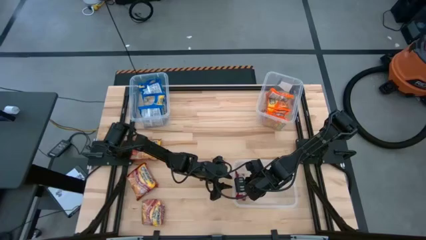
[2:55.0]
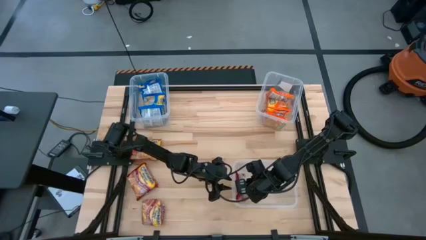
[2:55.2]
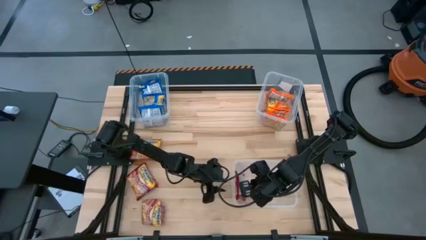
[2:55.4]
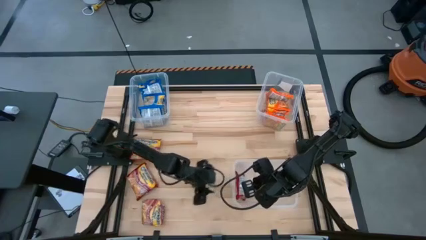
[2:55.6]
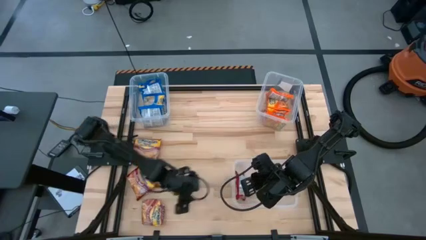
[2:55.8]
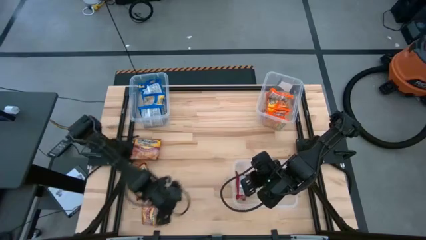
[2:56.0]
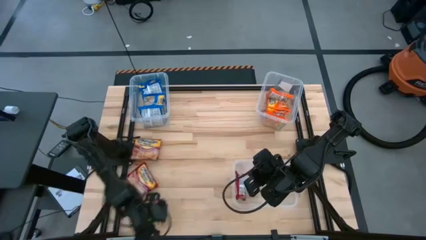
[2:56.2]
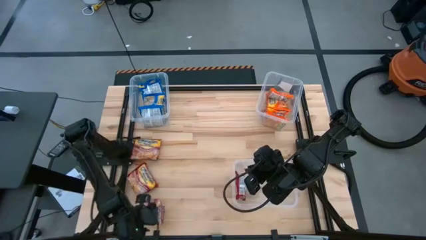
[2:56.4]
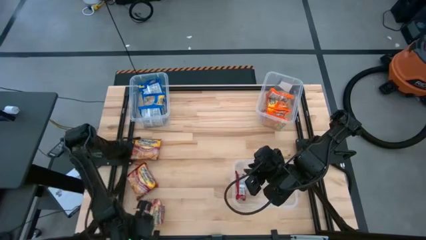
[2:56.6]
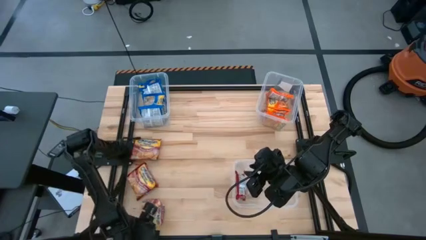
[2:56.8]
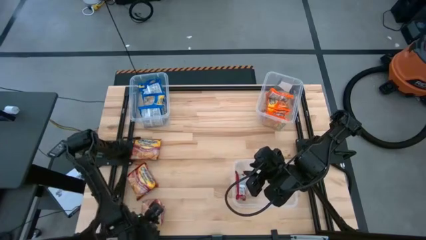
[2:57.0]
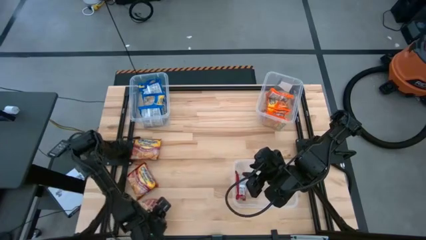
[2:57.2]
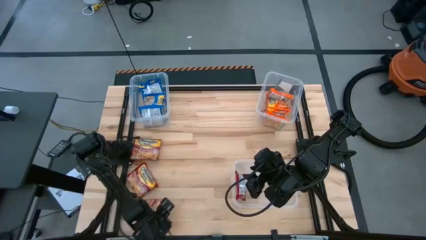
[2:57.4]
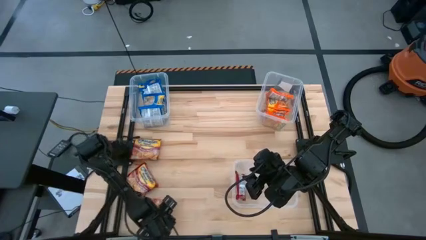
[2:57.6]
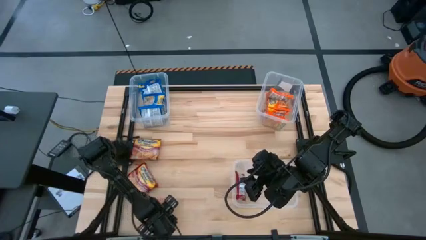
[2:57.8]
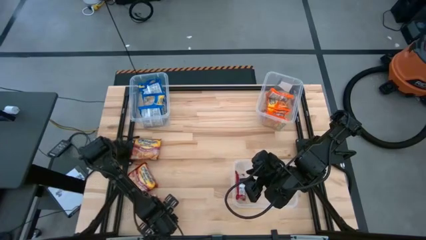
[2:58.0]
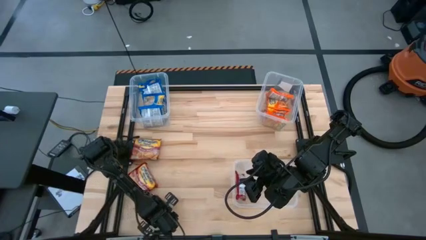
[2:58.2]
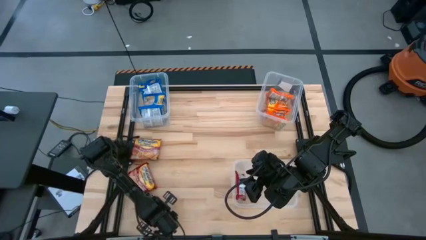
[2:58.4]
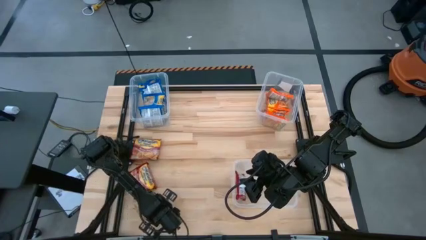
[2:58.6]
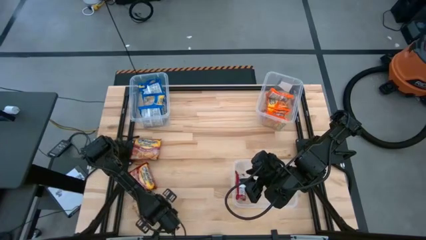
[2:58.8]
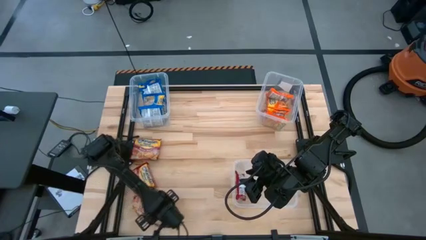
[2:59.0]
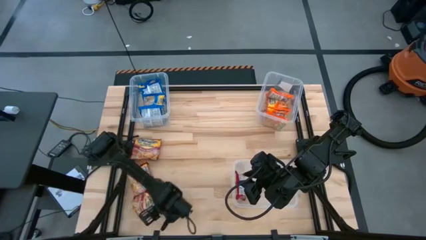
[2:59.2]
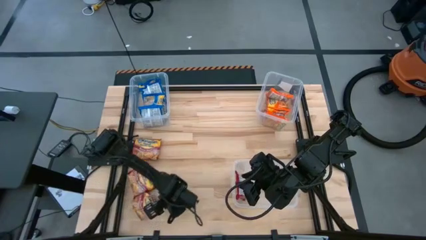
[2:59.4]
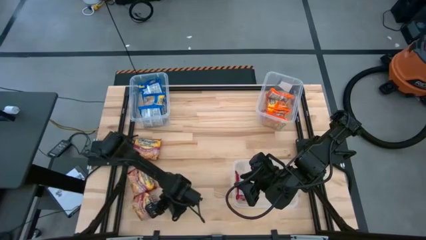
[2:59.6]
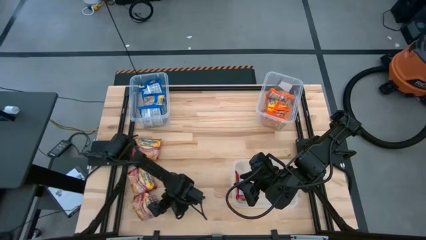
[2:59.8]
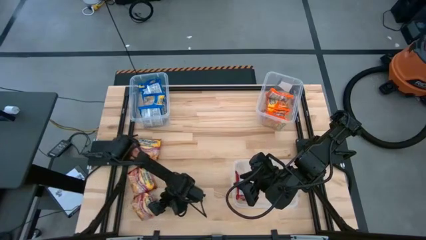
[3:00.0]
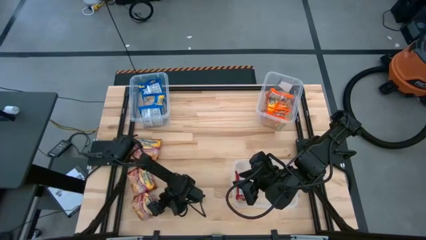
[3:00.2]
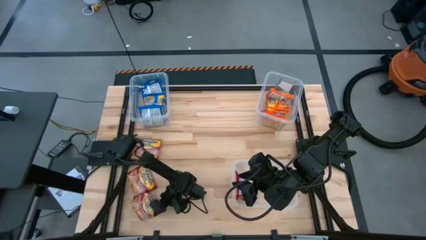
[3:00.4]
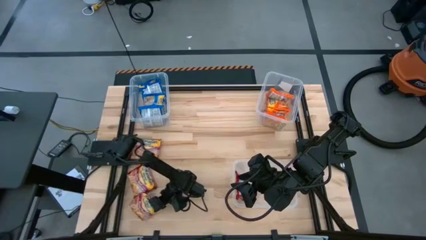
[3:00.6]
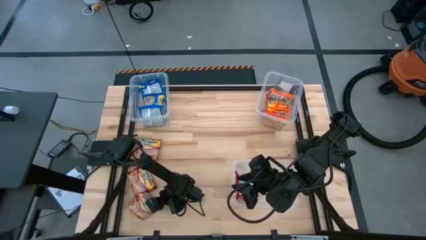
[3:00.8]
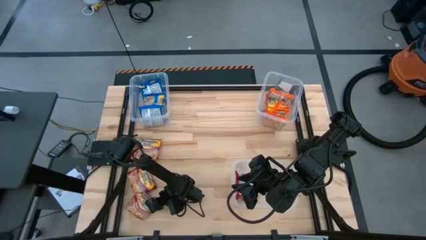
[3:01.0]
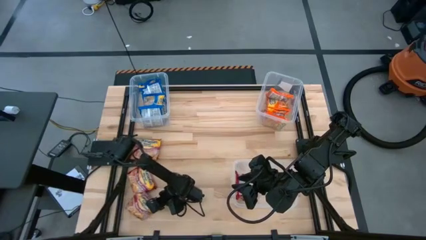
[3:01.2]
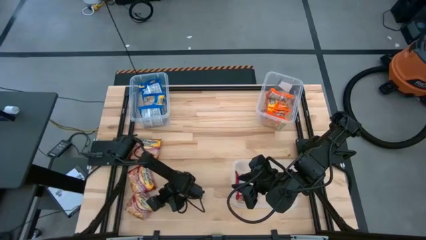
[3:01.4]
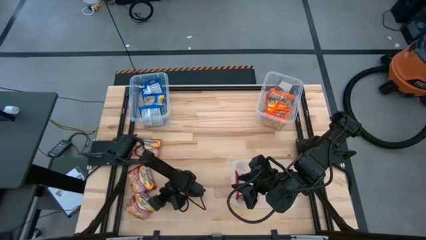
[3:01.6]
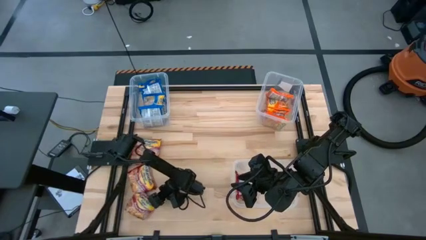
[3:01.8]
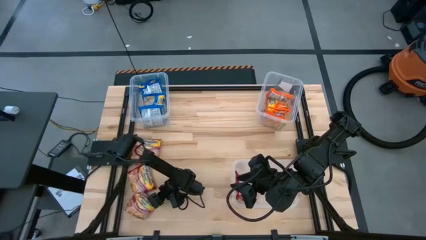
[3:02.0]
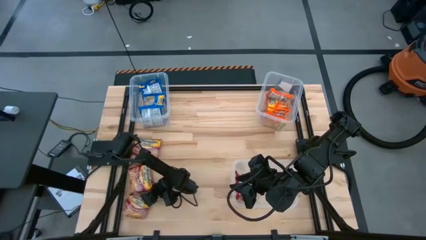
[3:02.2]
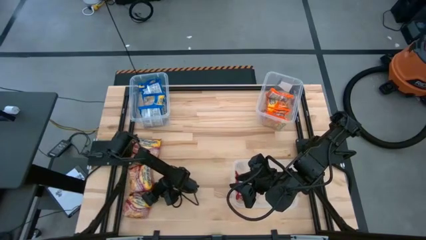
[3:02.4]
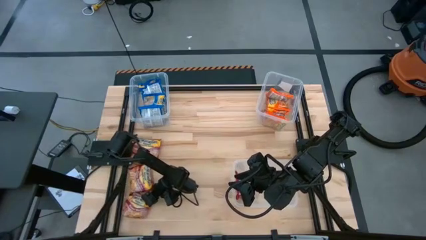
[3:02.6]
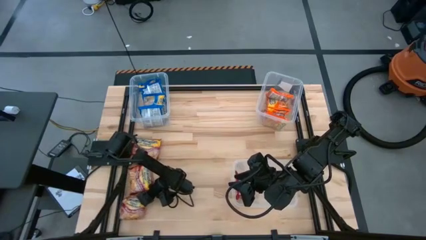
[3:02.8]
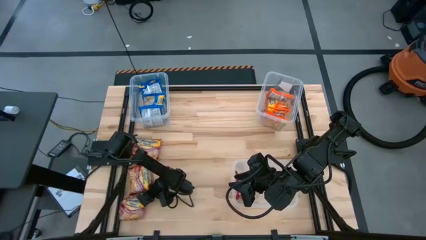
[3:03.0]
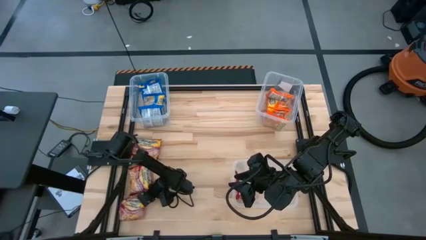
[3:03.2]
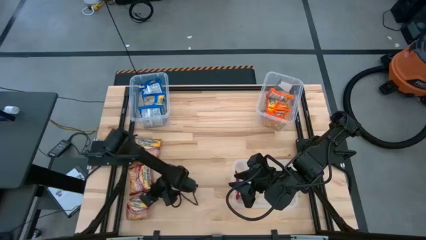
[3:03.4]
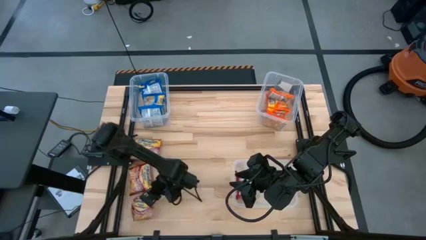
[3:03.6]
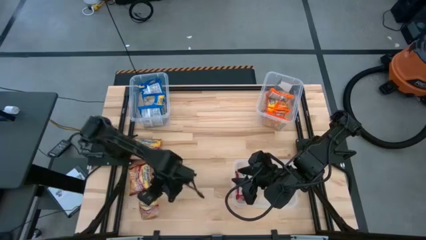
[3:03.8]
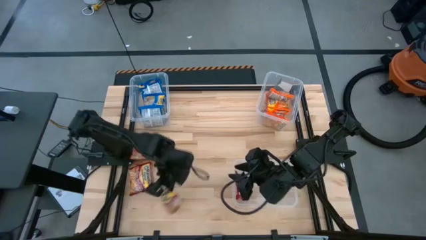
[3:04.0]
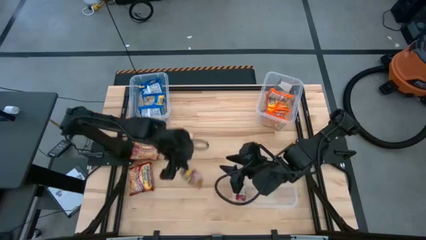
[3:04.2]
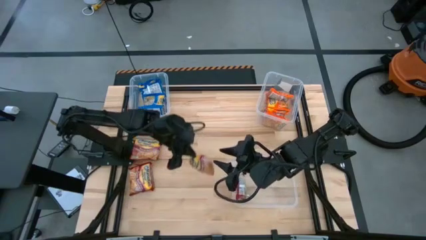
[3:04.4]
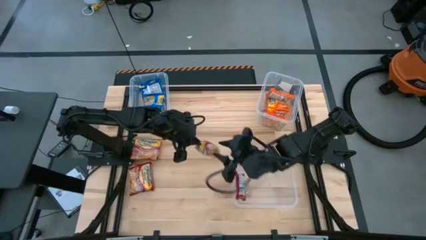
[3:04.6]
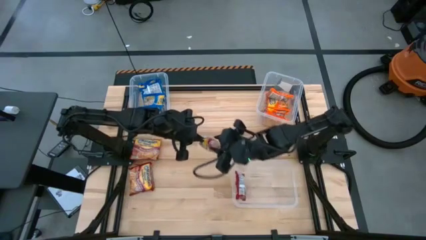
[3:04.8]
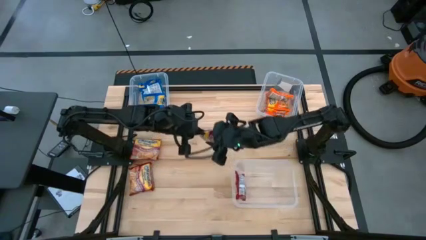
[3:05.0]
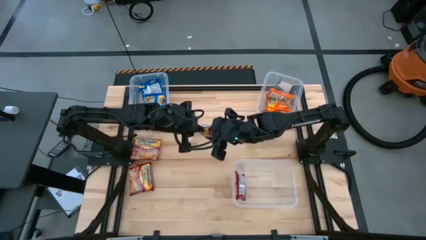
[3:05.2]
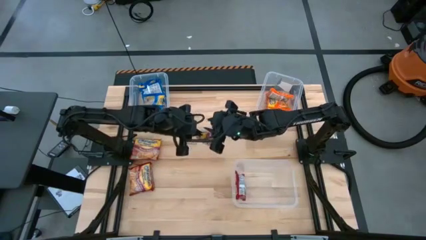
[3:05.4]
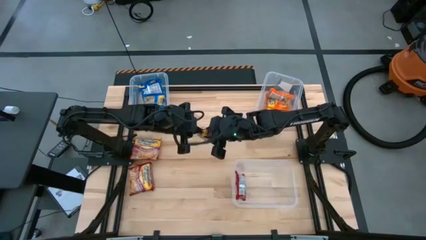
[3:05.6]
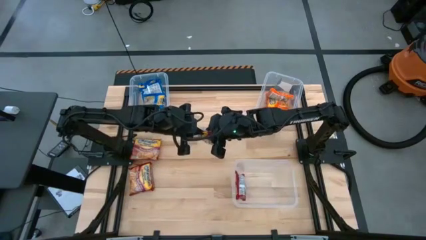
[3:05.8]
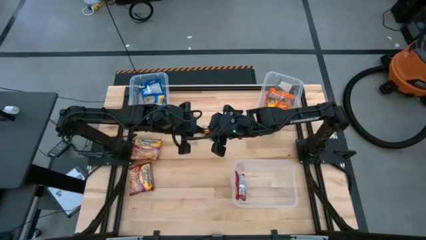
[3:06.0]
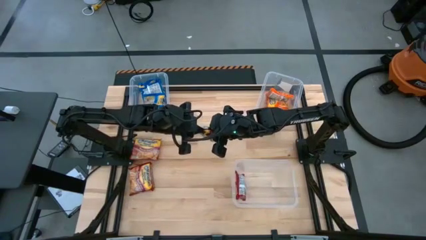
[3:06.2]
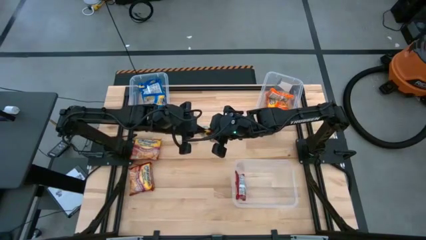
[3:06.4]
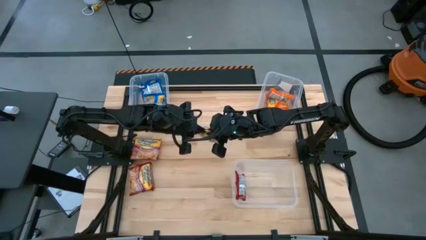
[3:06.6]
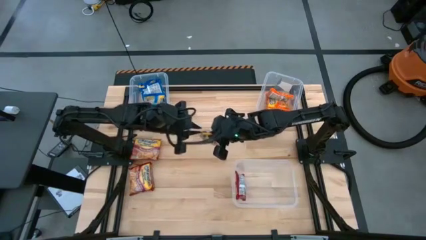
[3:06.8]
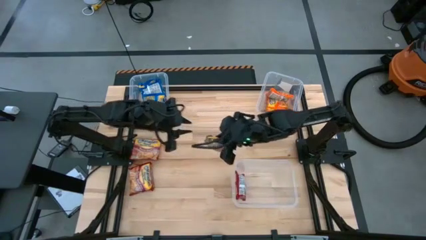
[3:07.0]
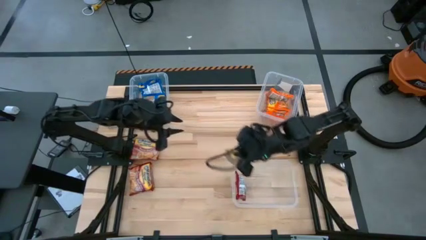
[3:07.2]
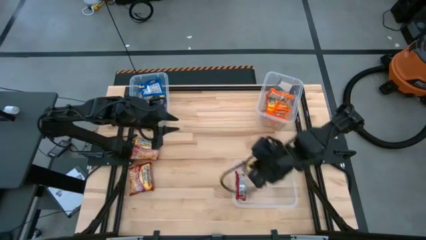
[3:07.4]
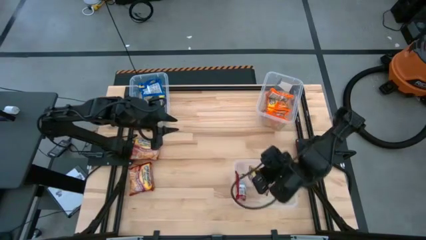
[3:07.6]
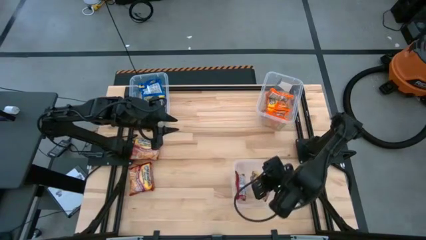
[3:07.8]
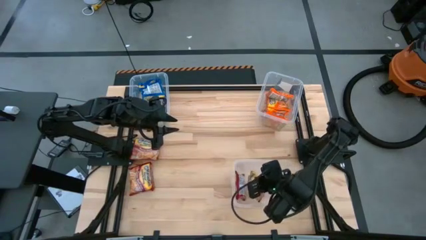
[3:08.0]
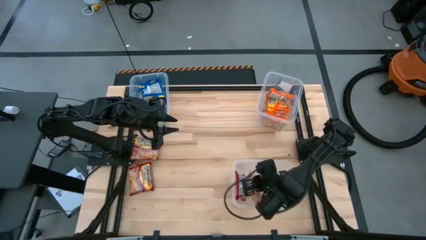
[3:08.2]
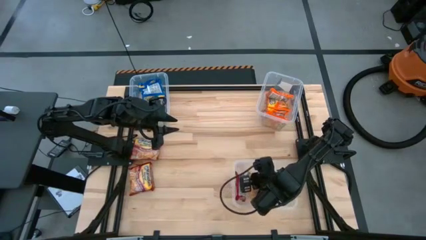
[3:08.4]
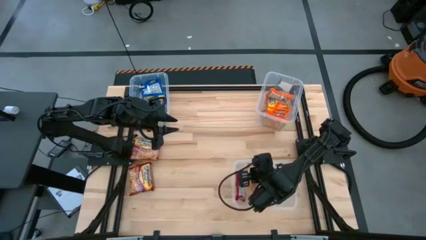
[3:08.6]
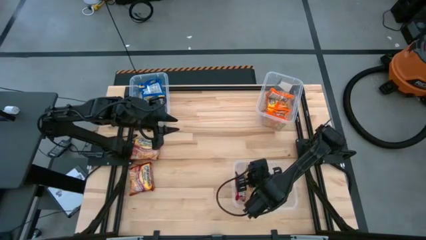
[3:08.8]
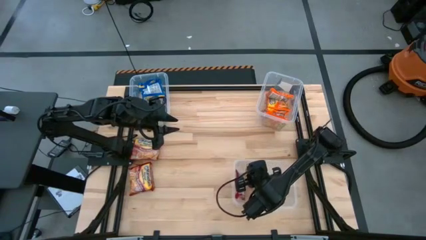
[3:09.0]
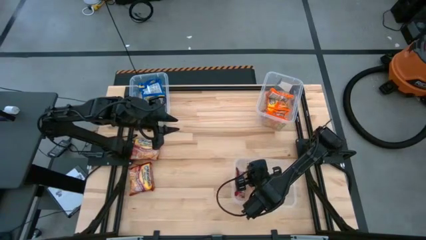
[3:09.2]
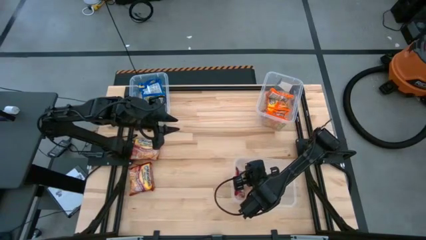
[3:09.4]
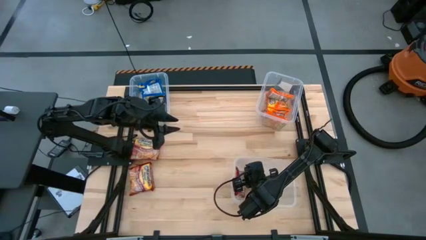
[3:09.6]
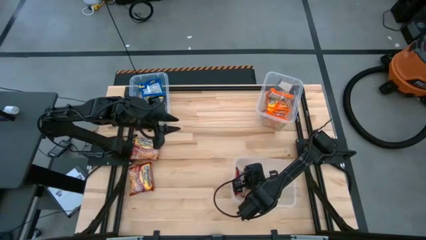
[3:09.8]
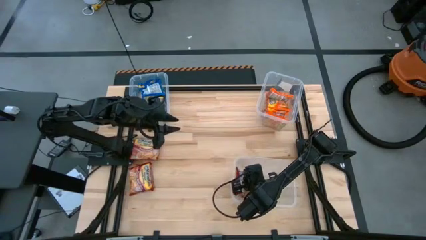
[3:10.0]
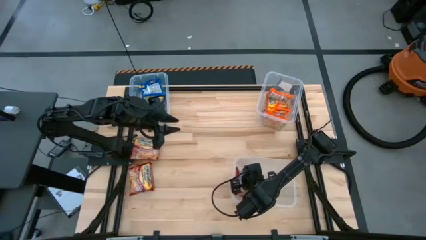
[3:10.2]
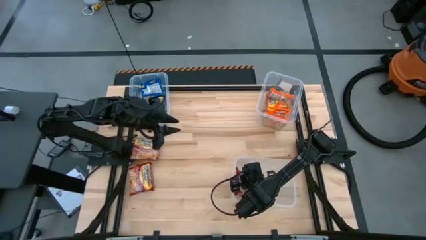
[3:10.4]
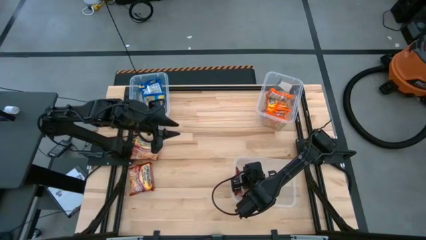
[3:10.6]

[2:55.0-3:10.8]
Task: Sort Maruchan noodles
Put the red noodle pack into the bottom transparent bin
